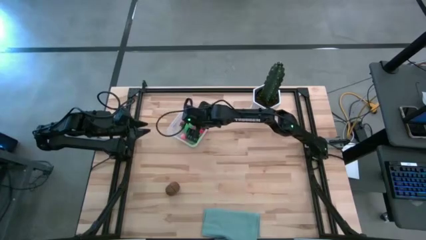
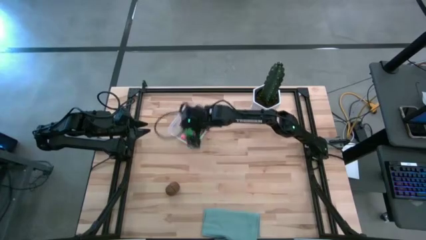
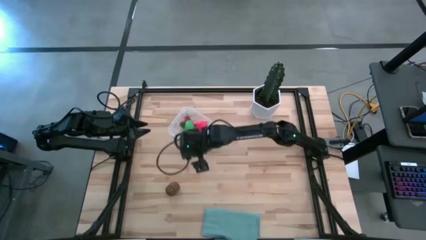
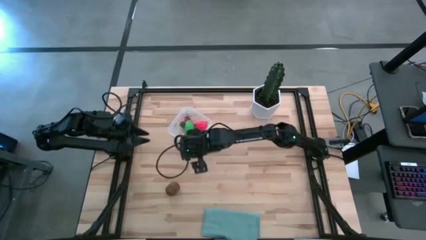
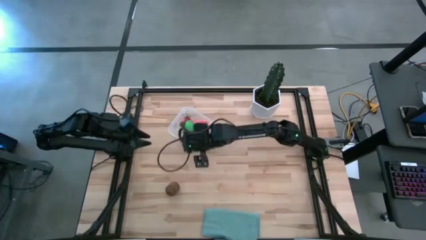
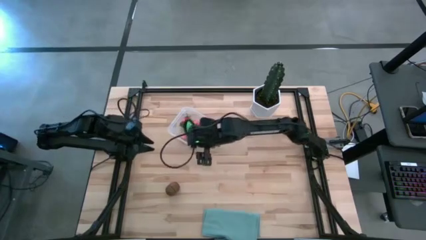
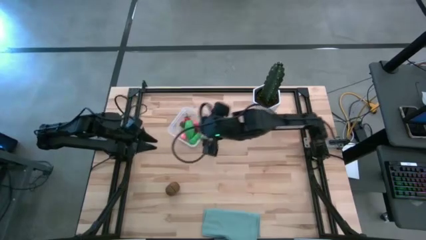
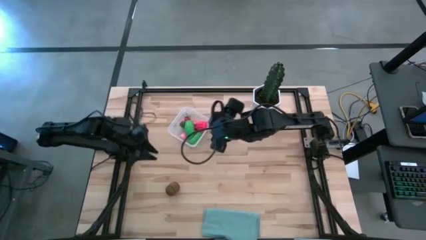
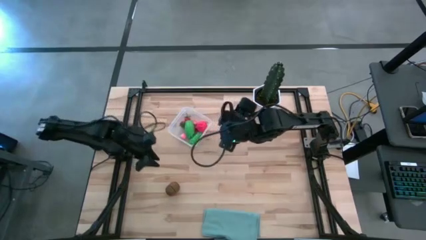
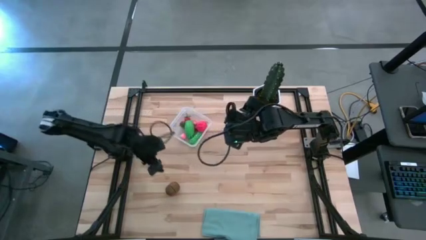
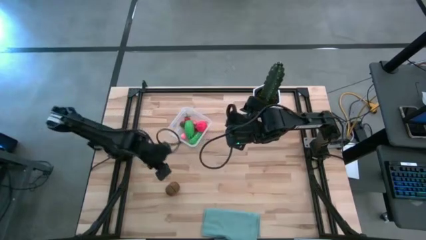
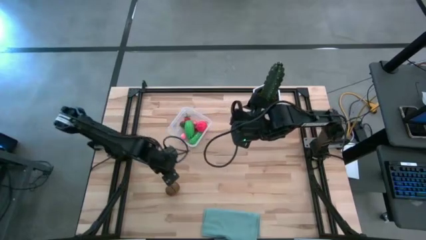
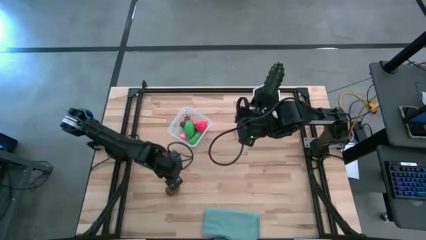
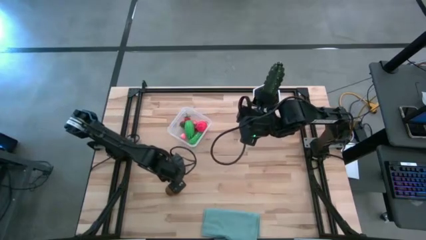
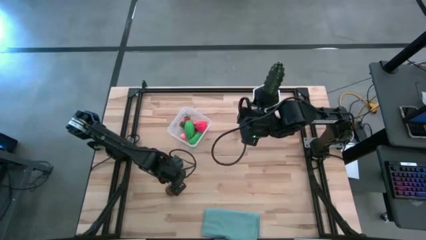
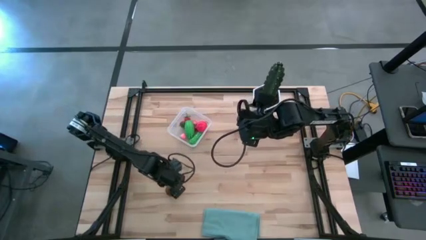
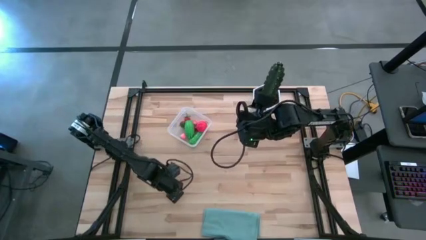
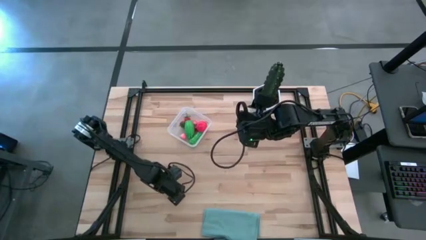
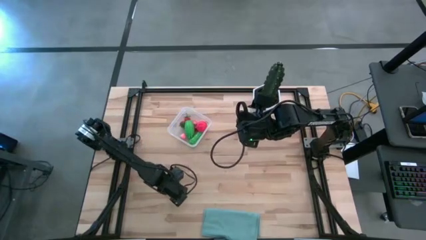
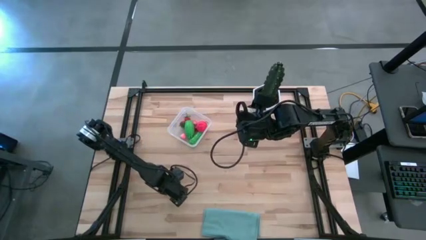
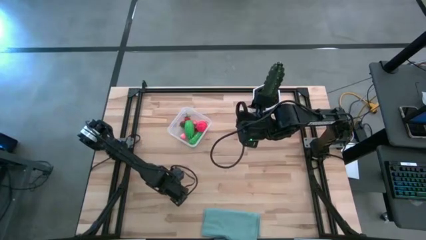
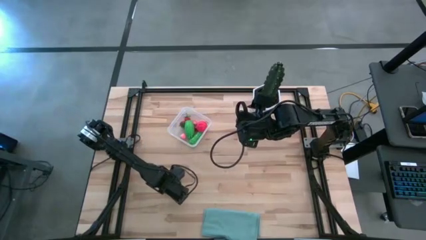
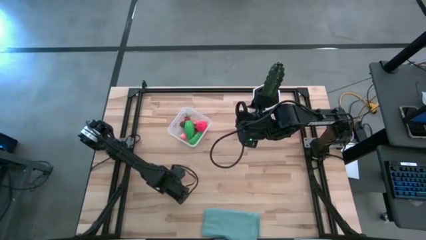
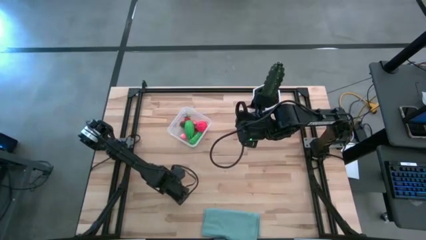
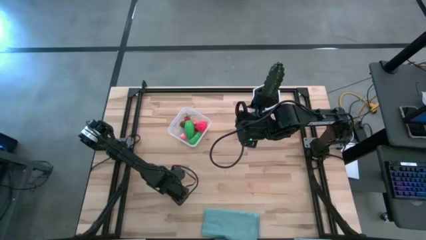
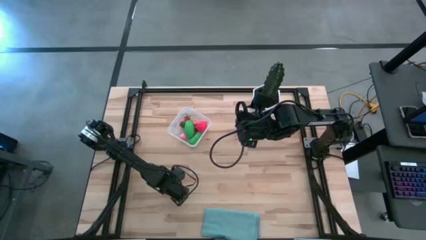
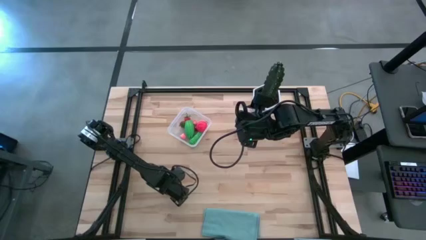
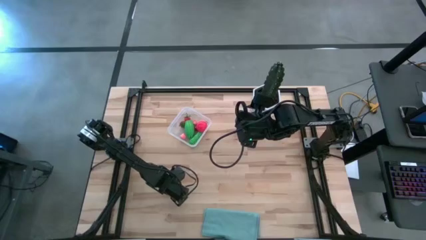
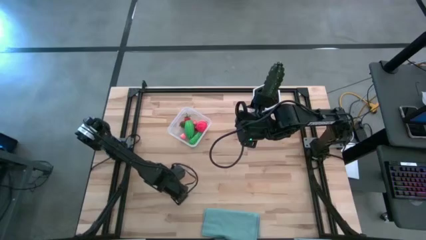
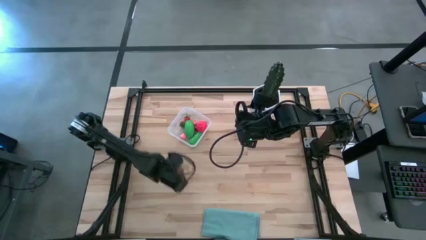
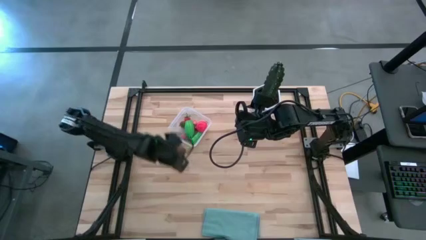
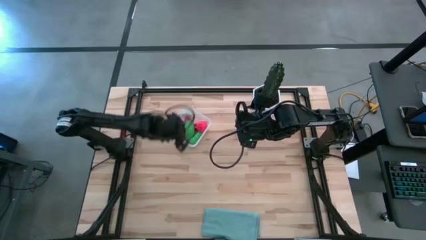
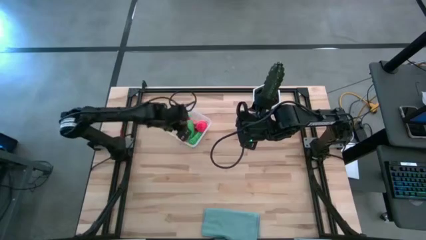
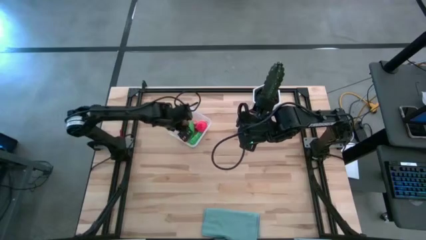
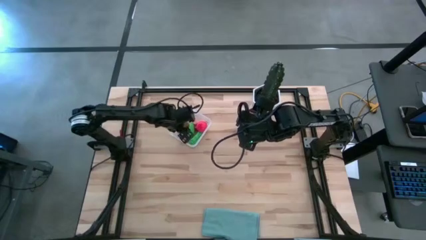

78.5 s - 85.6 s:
Task: Pick and placing Produce into tupperware
Put the brown kiwi into the transparent bin

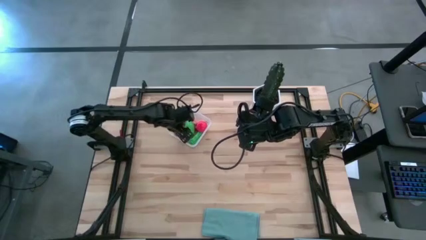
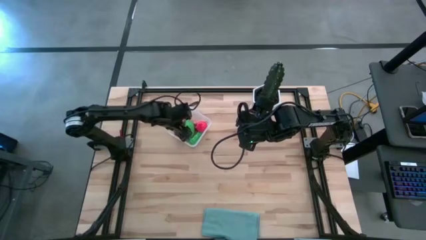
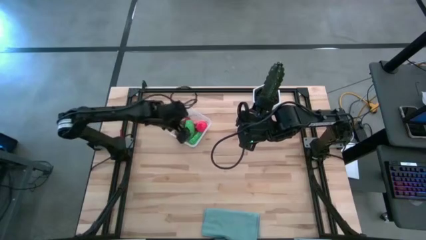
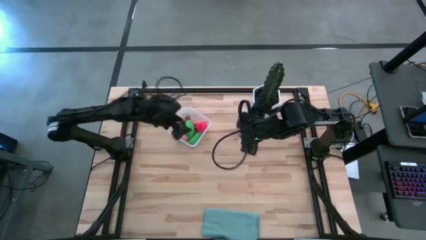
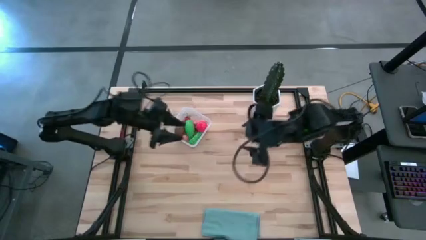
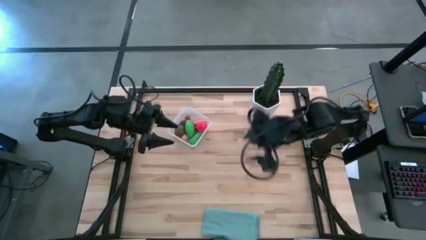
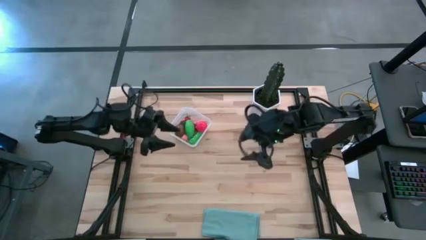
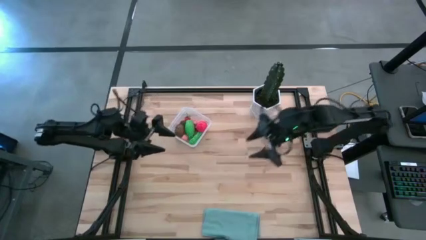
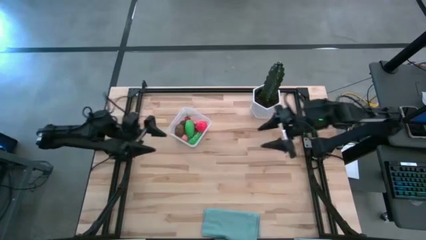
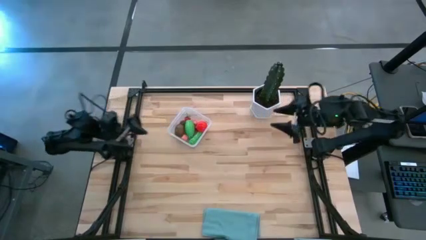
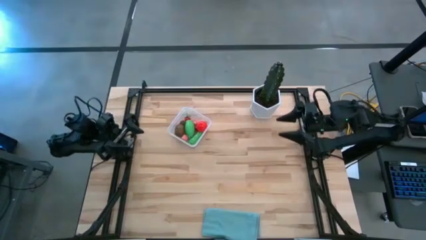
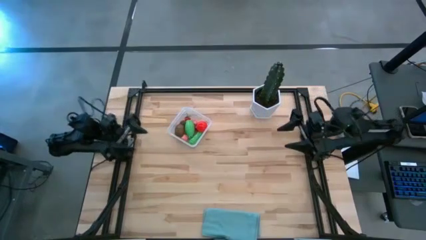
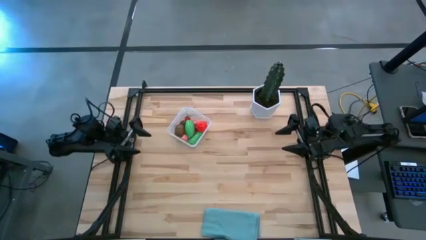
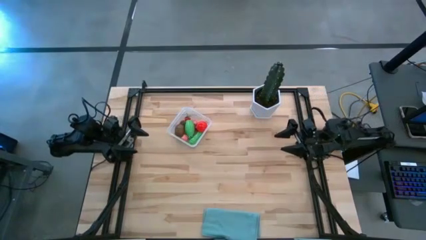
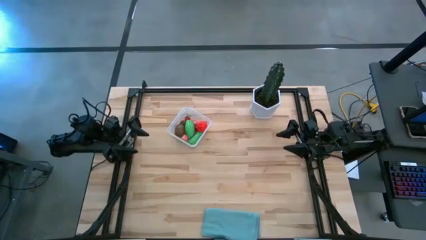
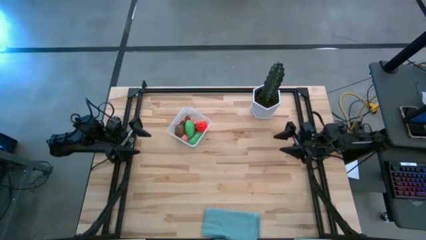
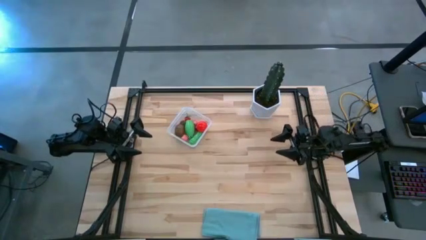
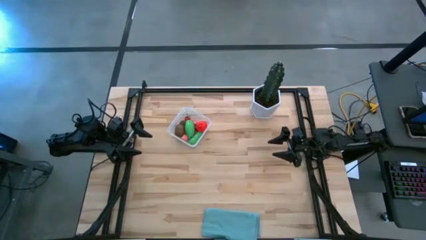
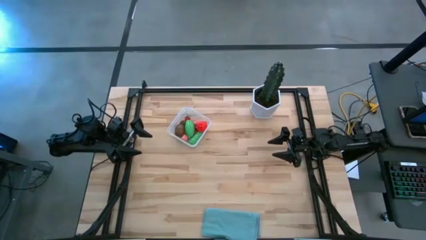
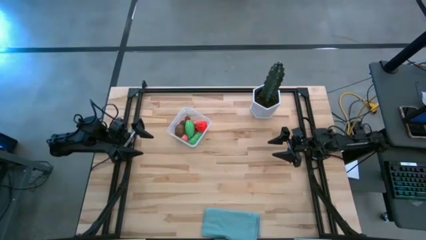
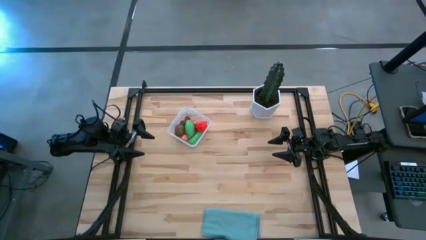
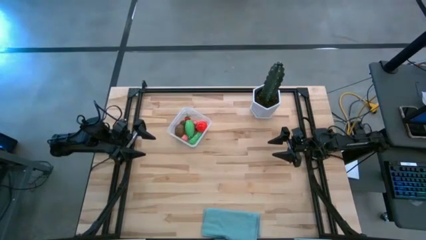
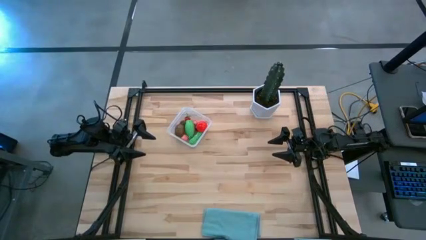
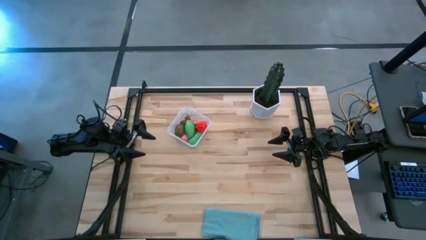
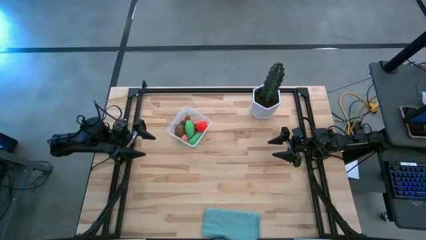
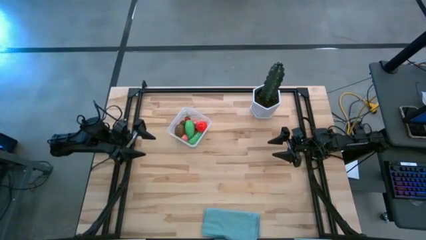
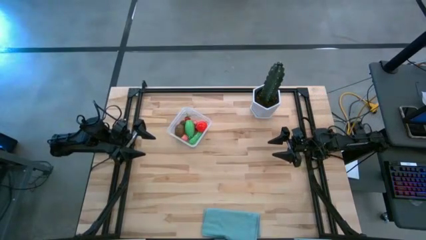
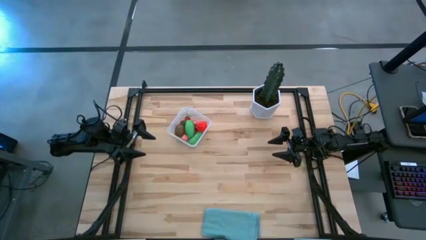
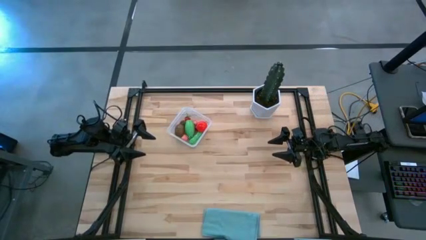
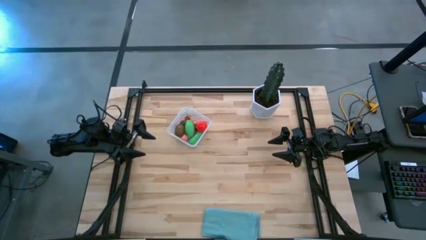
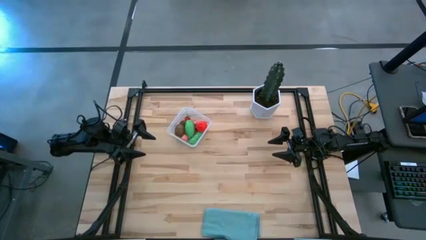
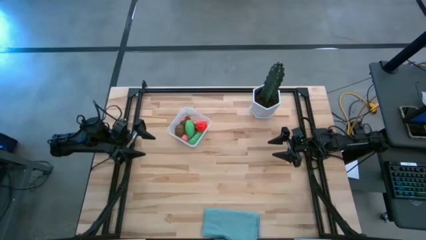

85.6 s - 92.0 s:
Return to Home Position

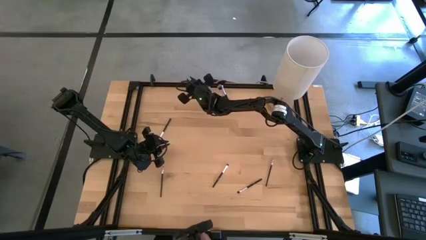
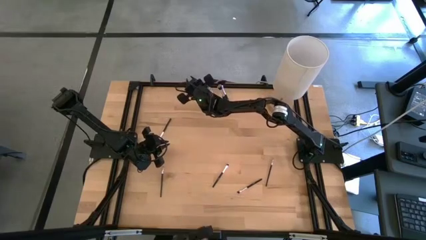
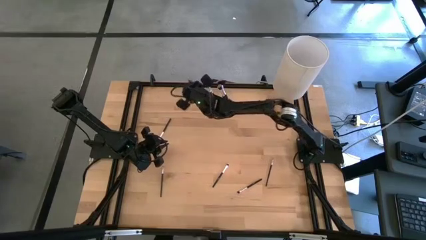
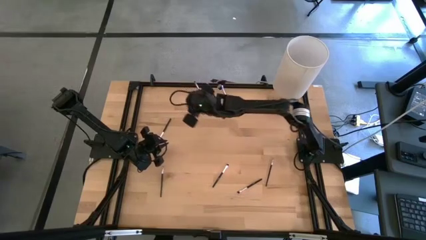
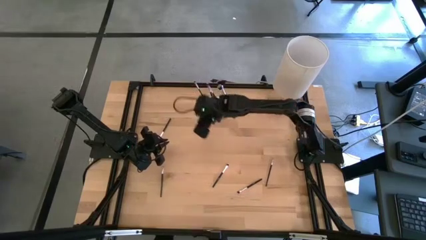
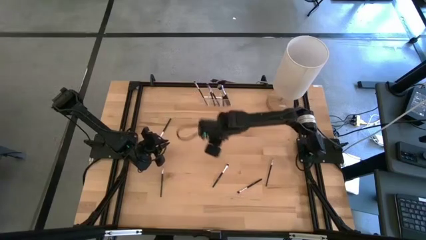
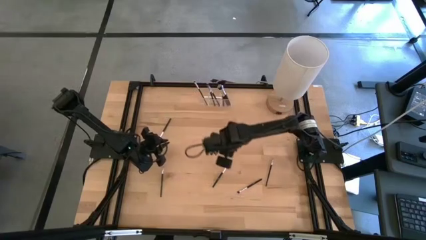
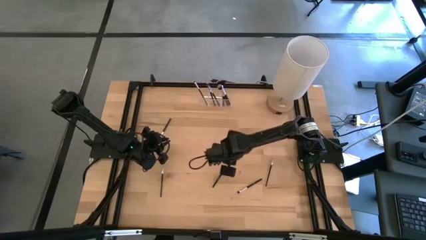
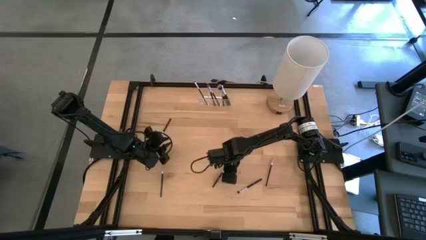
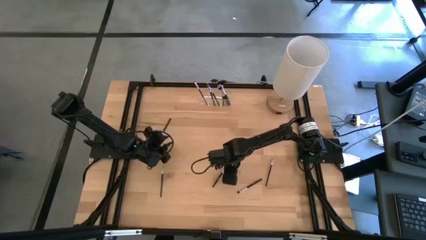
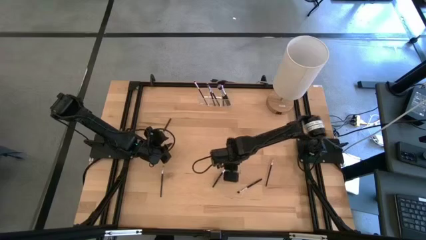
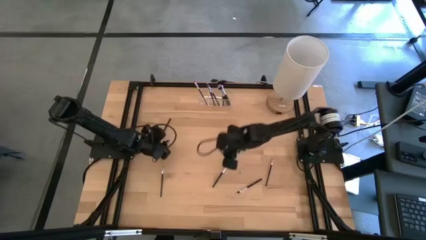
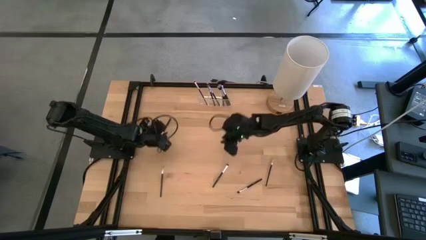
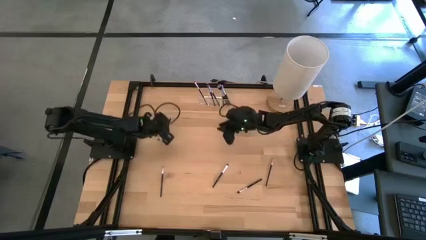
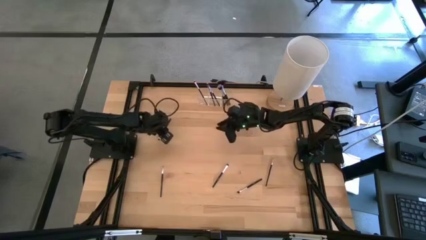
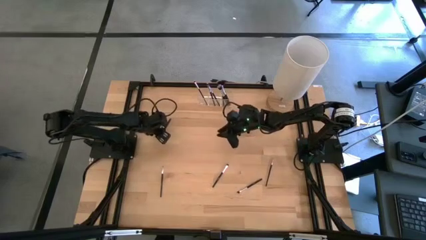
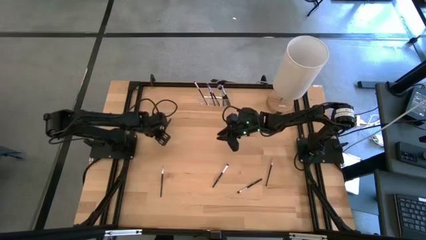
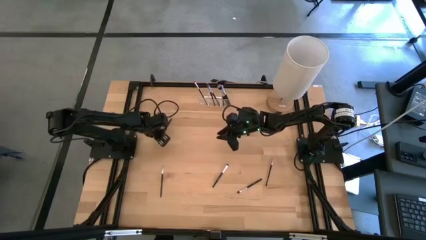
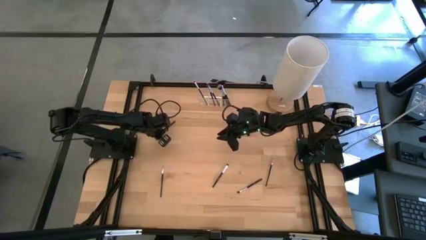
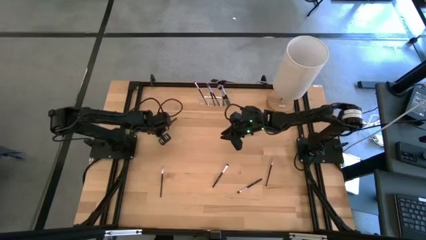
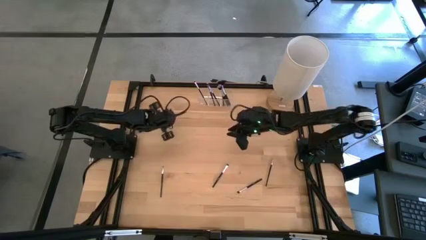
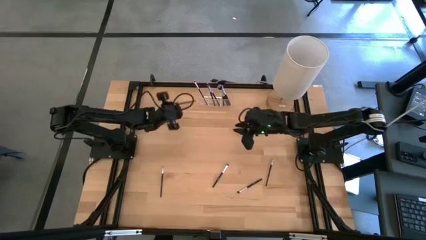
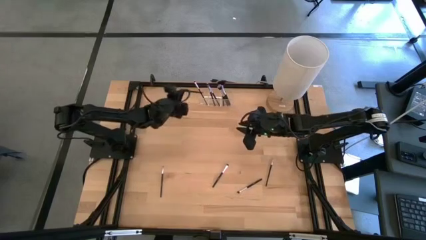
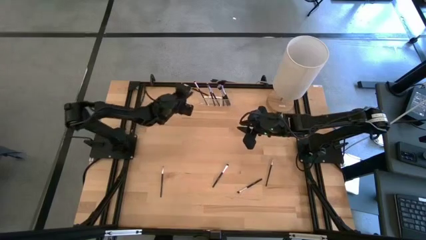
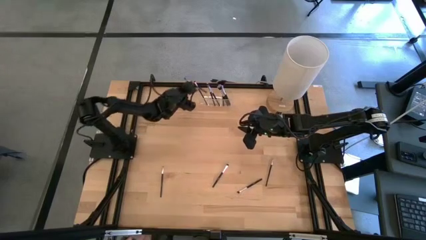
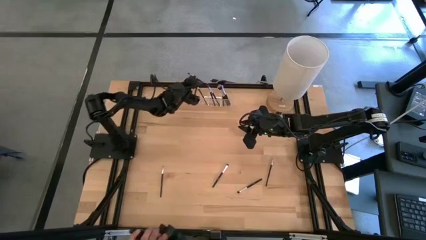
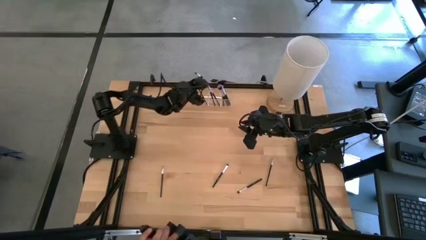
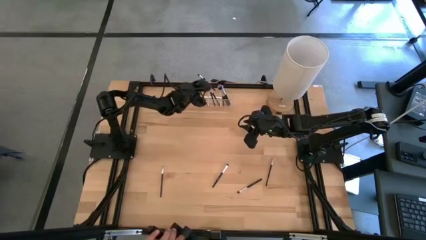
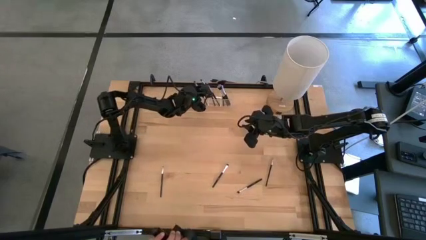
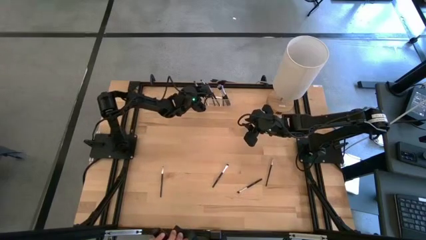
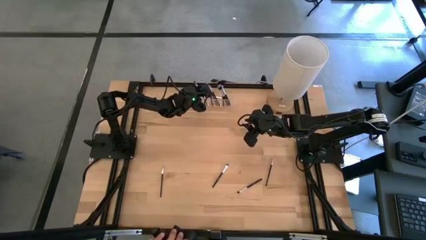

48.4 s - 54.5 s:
Task: Put items in baskets/containers
Put the black eyeshadow brush into the transparent organizer
